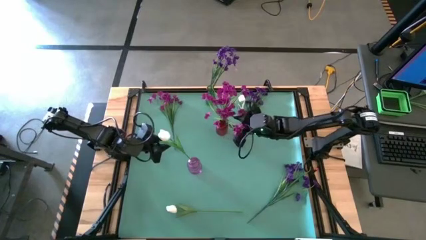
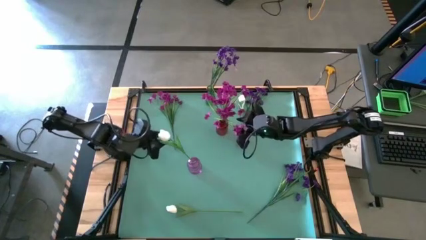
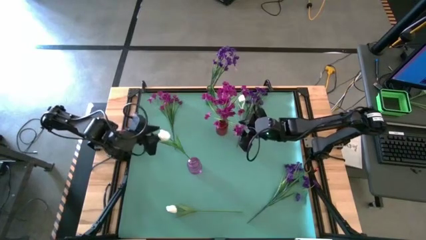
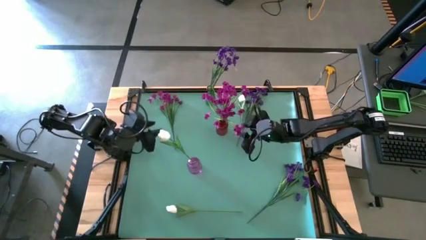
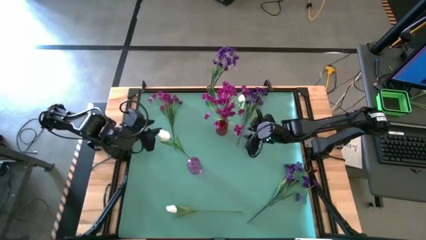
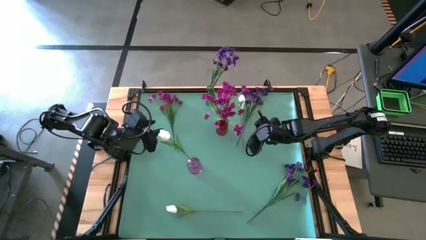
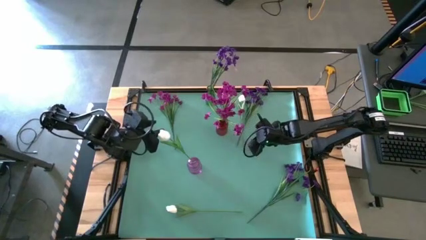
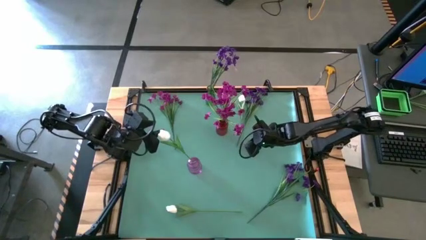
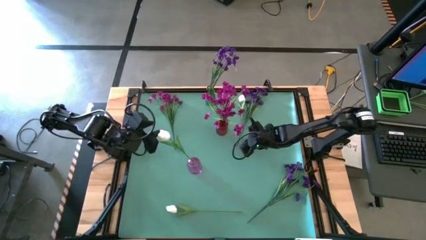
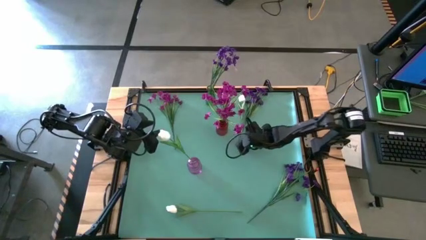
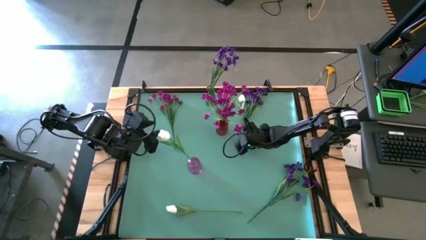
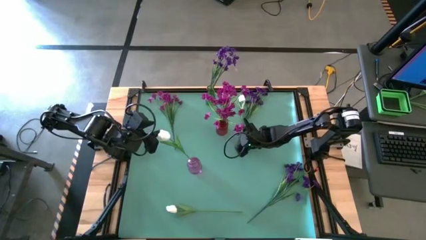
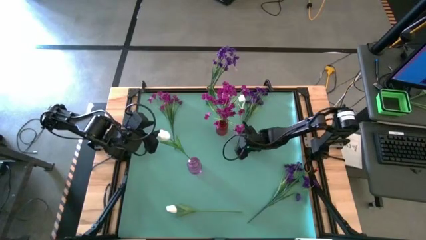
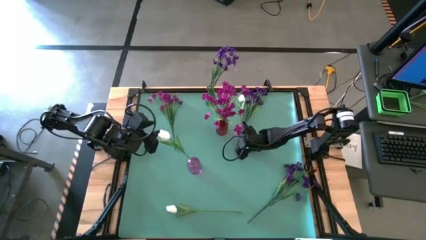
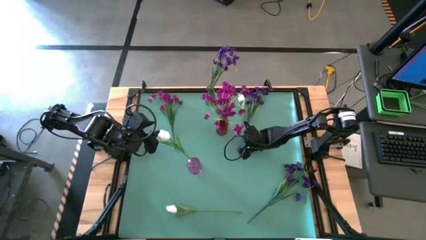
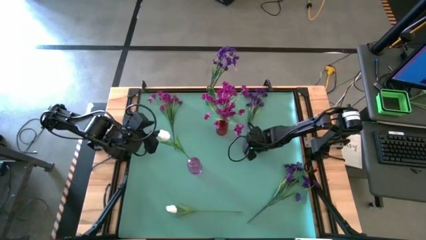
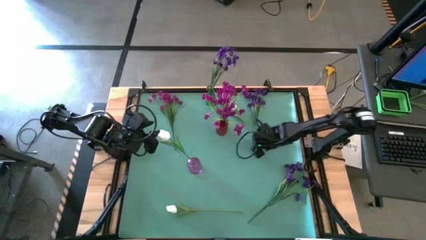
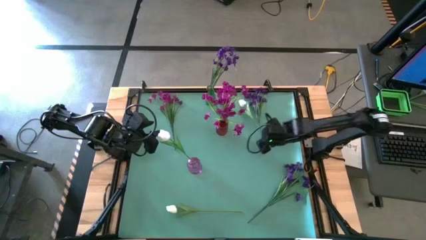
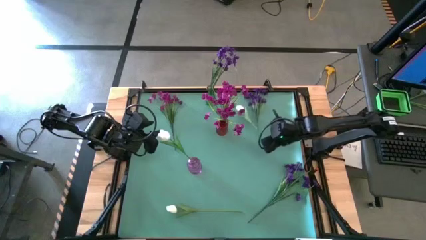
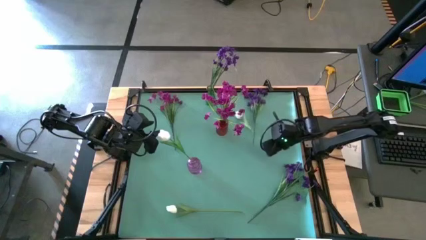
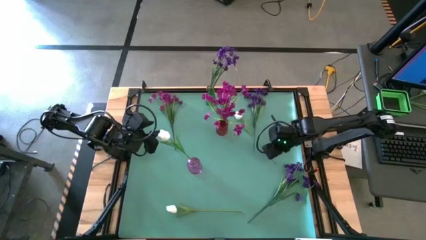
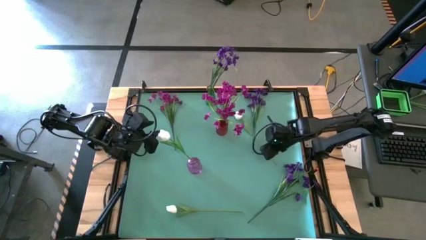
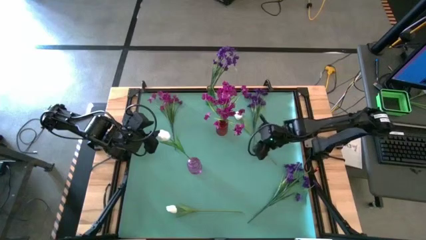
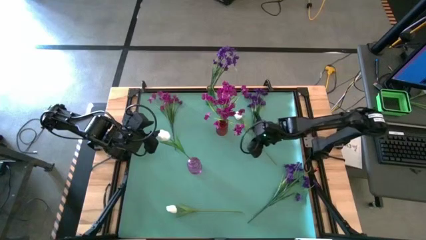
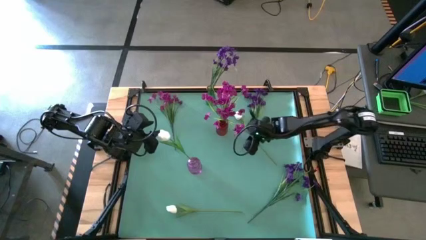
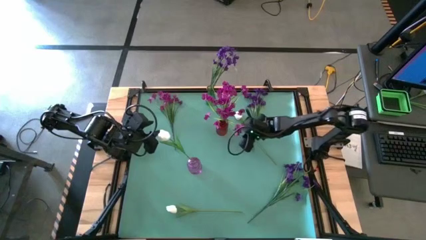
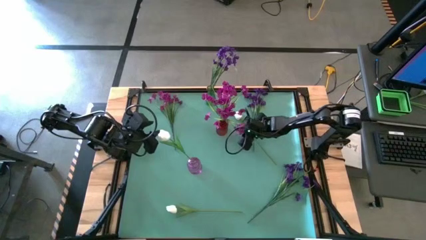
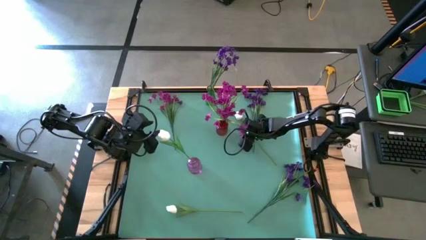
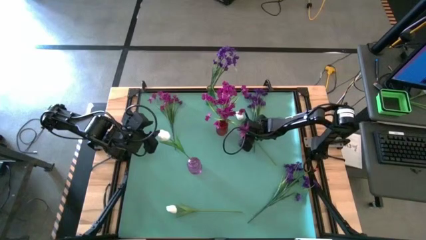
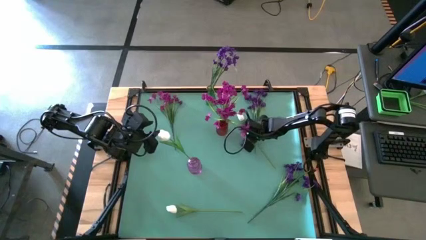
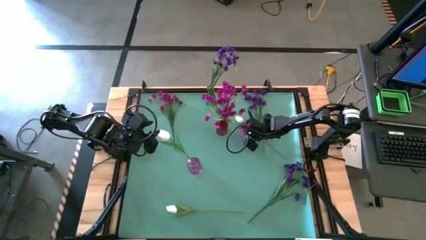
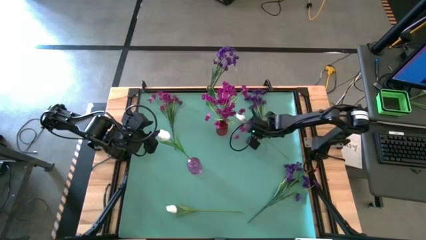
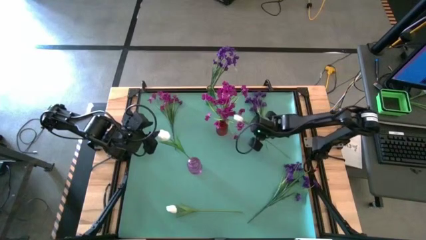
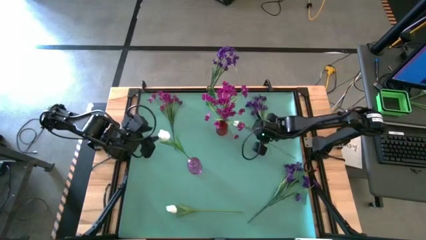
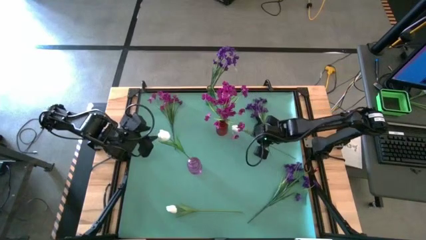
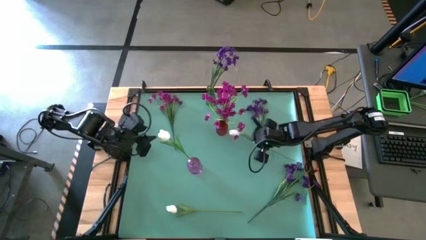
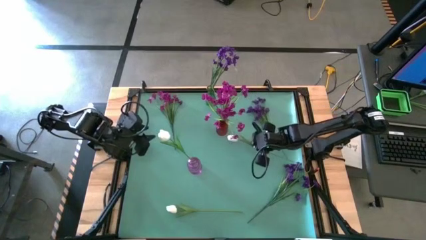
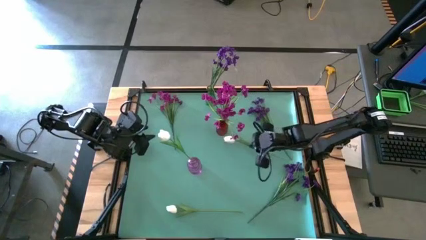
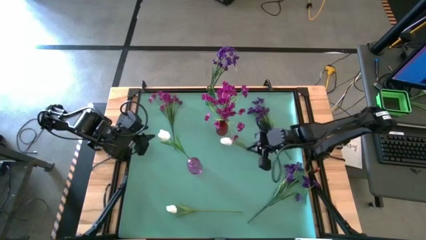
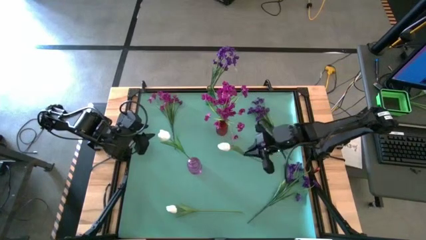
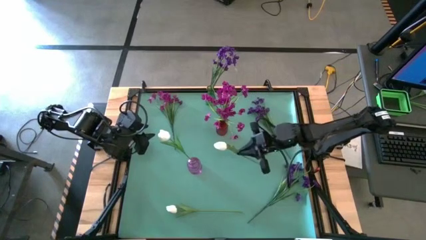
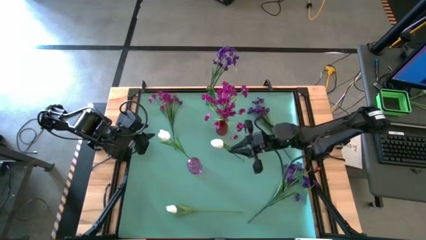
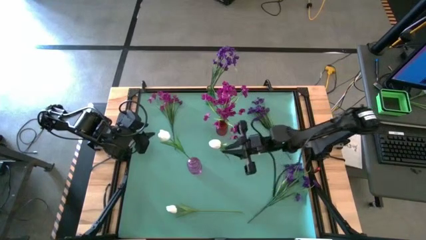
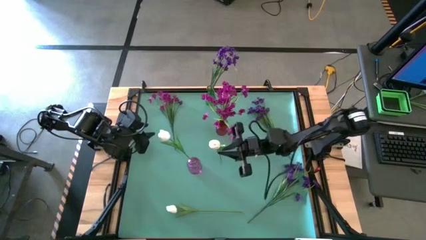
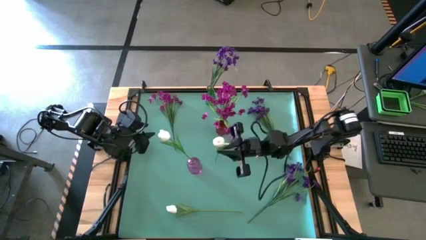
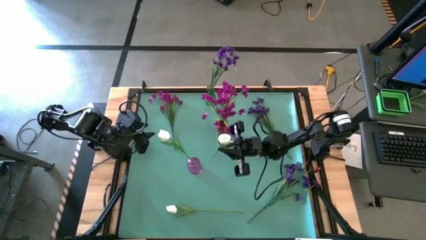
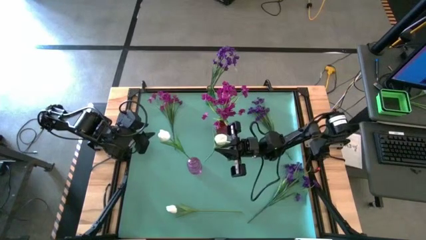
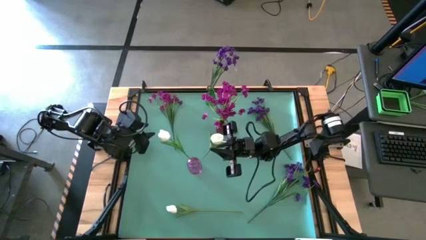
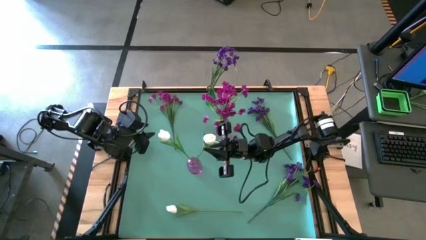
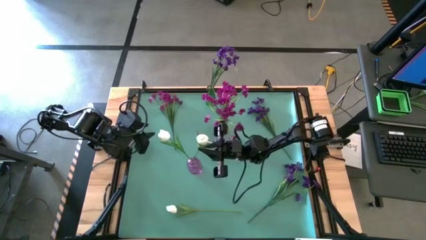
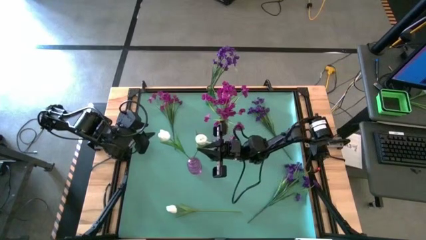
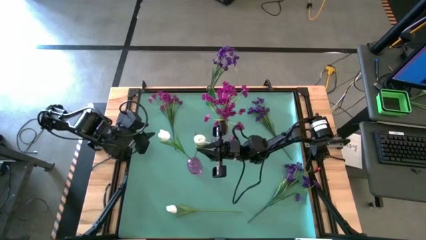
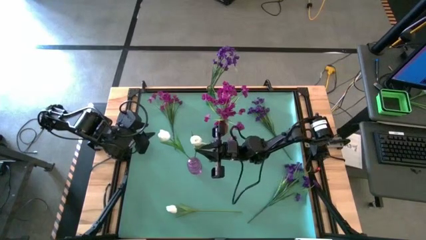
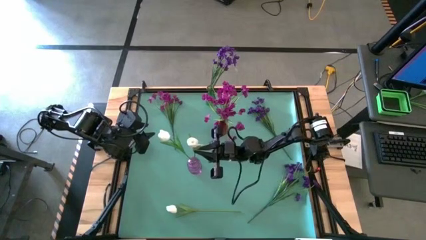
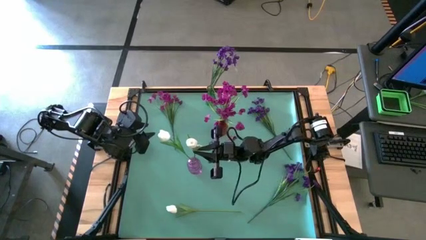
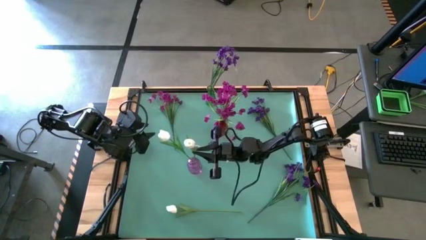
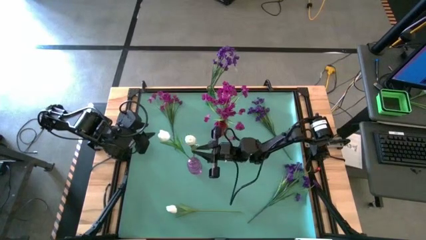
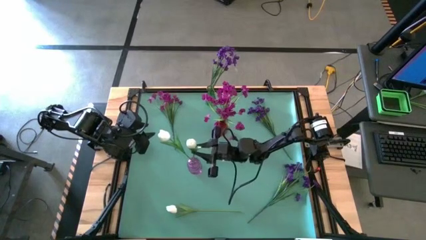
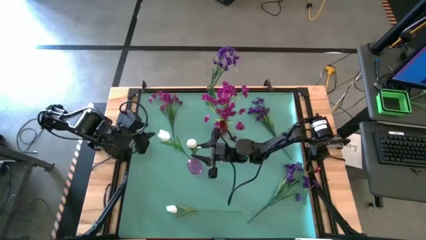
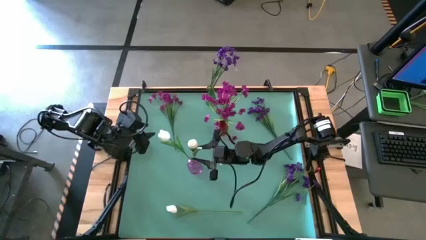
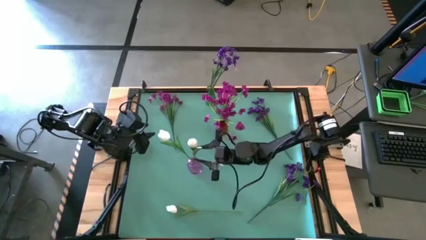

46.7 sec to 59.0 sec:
Task: Sort flowers into vase by color
Put the top white flower into the purple vase
